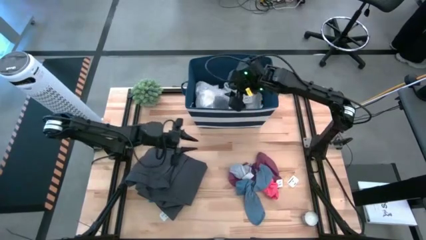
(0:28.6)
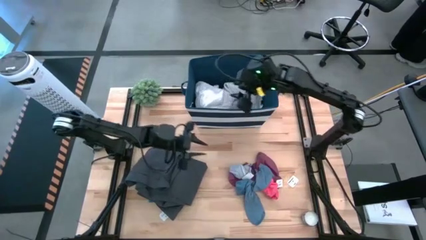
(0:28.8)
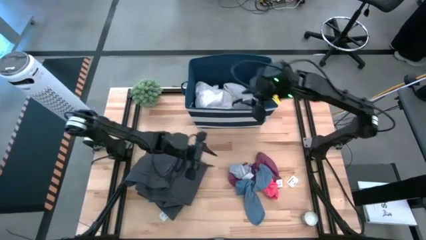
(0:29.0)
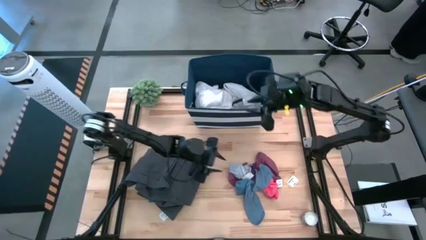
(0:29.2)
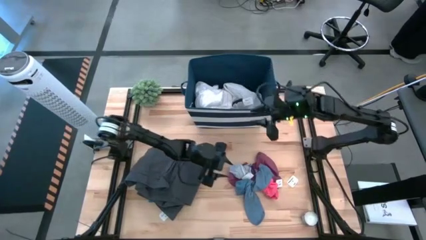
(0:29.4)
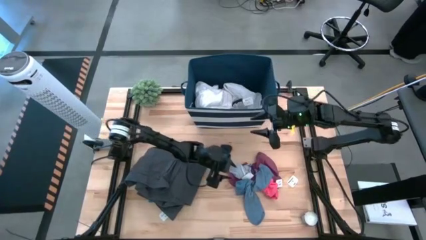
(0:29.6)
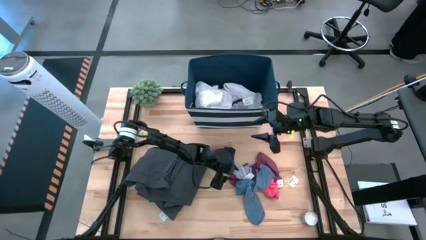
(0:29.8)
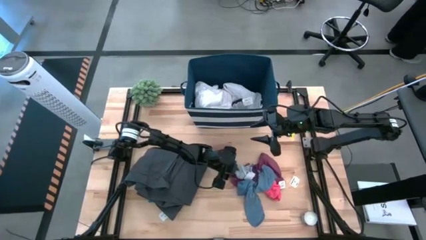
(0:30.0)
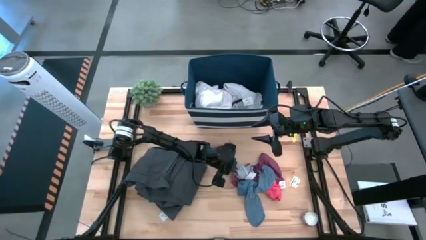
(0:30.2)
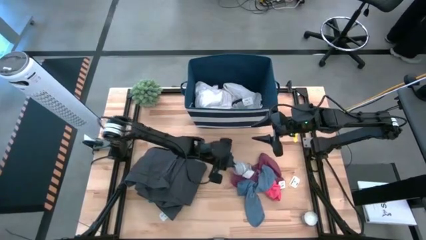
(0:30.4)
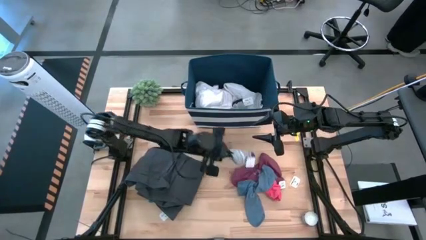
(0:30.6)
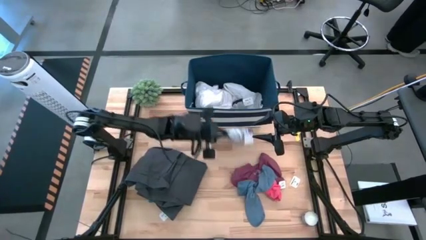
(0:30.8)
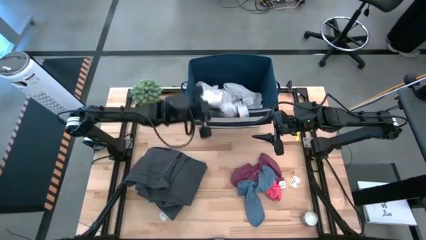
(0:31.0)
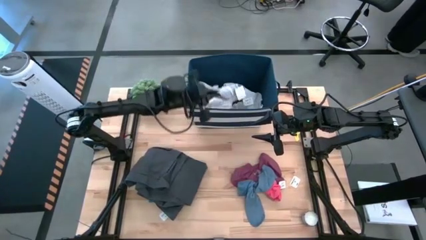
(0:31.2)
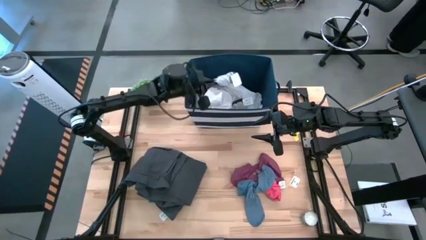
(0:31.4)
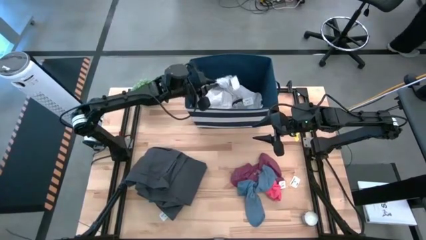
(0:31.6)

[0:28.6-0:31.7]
Task: Sort clothes
Put the light gray sock into the blue laundry organizer

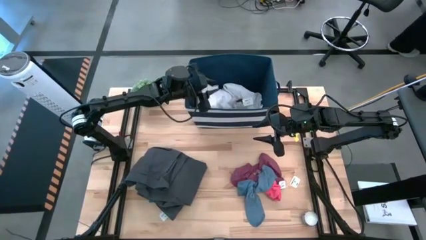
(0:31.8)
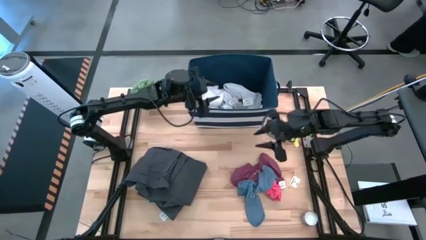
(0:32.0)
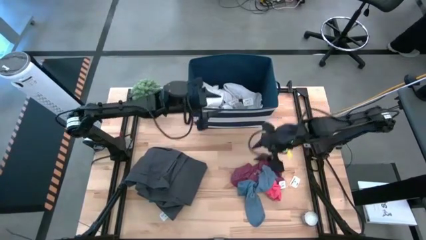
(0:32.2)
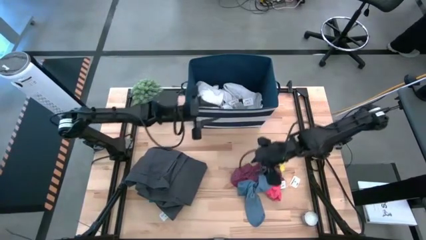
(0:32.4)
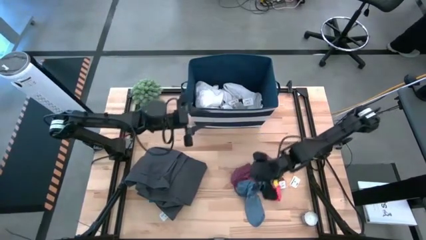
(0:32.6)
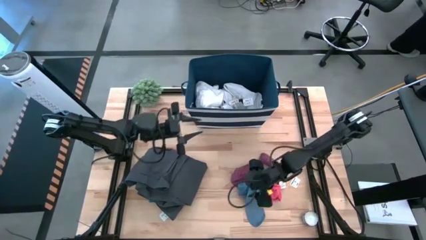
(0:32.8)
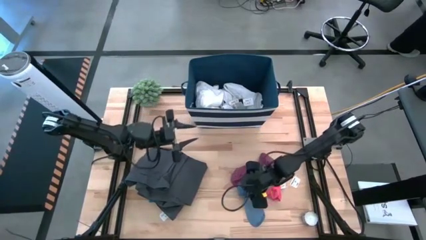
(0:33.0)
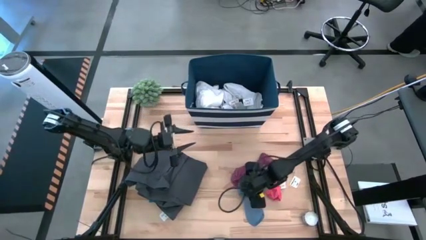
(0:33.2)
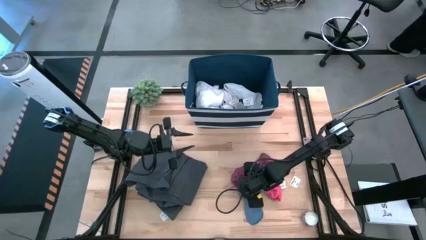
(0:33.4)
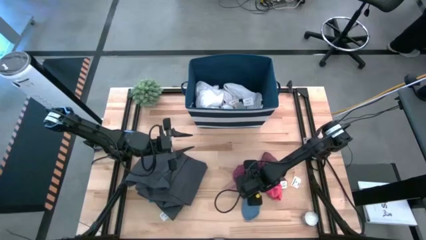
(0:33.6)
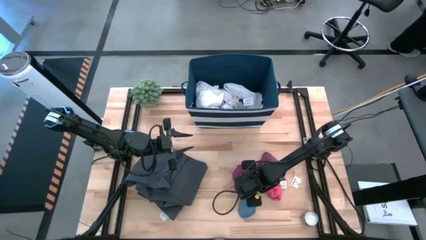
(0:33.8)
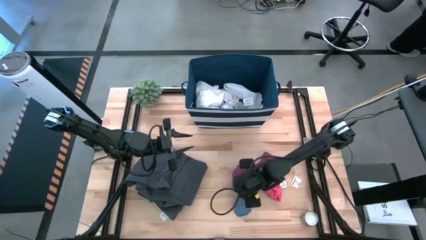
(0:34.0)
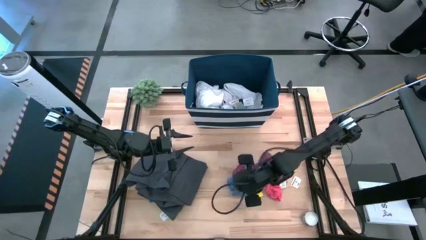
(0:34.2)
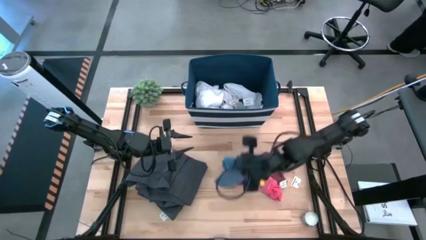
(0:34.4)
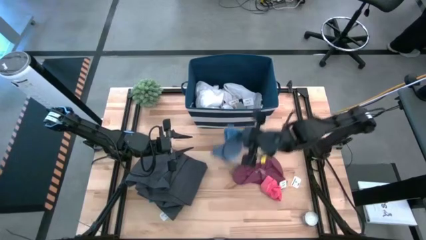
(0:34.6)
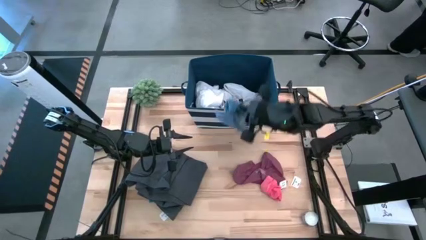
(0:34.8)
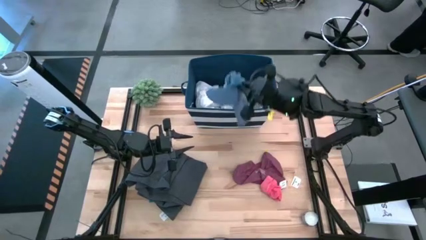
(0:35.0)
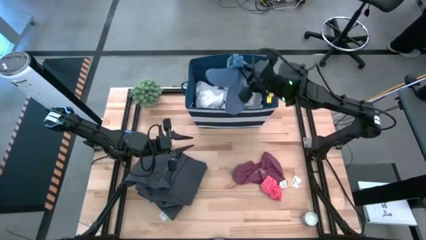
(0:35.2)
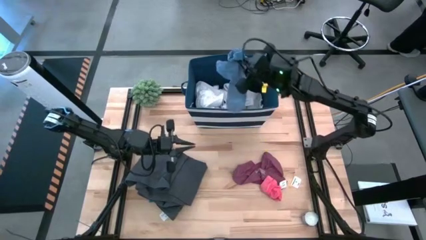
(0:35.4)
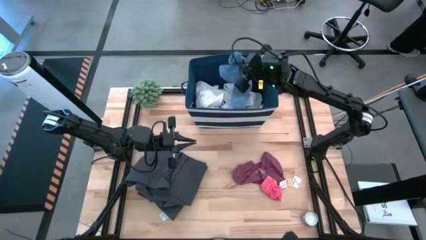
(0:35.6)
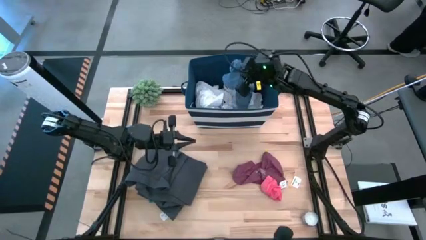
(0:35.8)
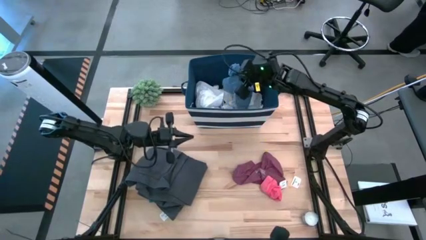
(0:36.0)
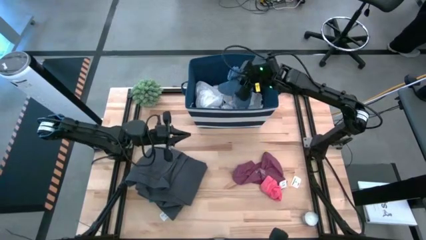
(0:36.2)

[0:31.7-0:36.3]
Put the blue sock into the blue laundry organizer

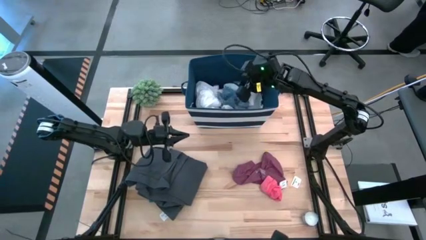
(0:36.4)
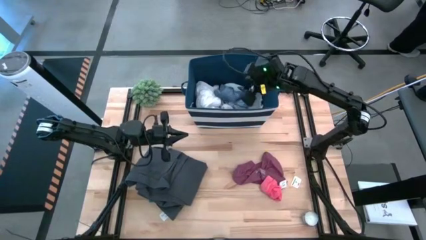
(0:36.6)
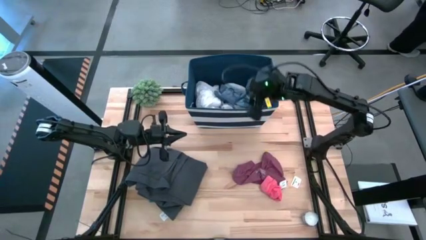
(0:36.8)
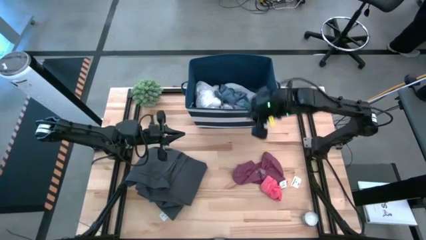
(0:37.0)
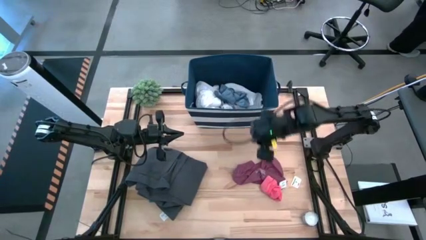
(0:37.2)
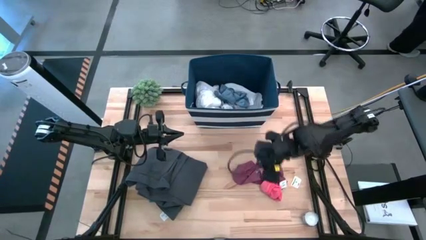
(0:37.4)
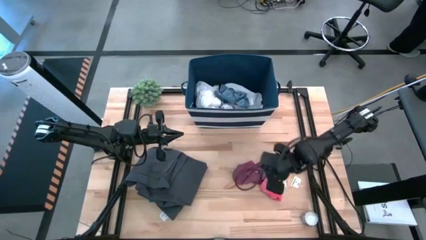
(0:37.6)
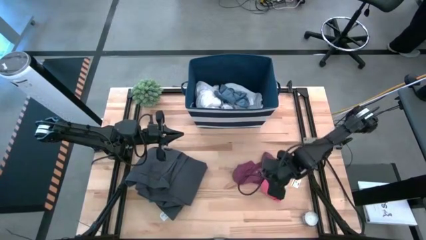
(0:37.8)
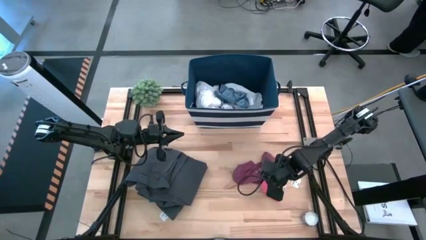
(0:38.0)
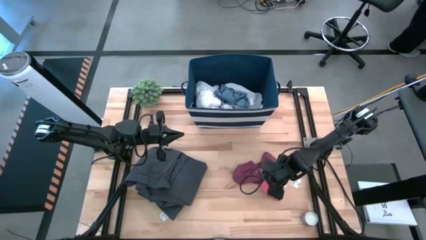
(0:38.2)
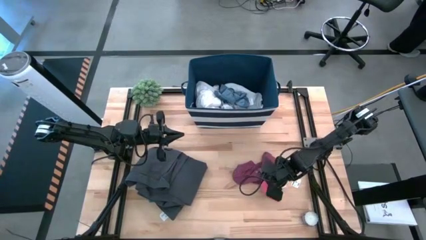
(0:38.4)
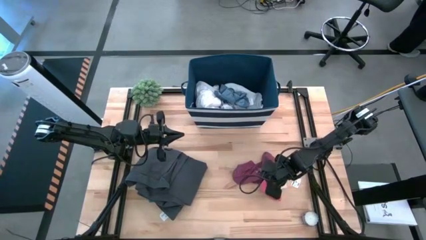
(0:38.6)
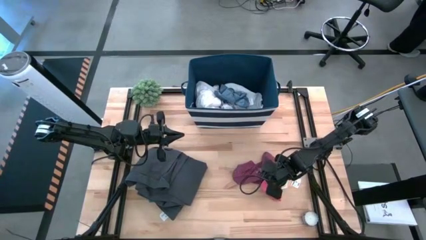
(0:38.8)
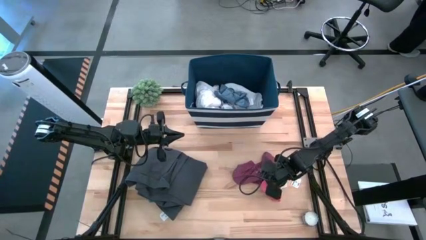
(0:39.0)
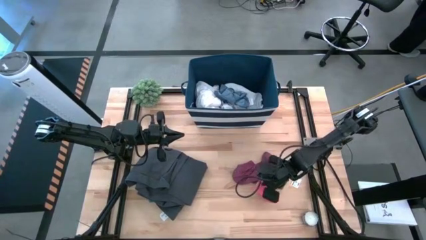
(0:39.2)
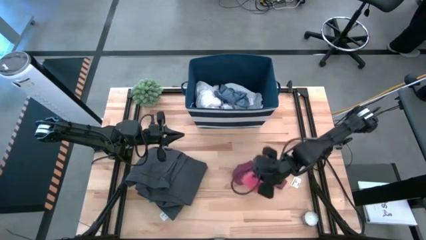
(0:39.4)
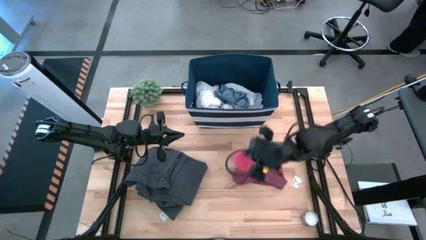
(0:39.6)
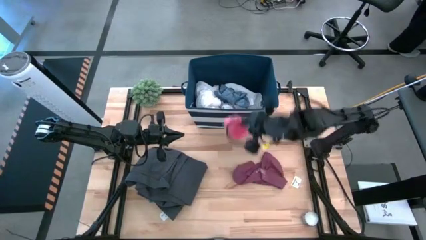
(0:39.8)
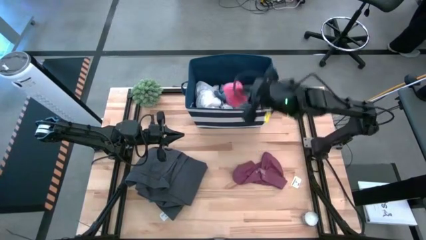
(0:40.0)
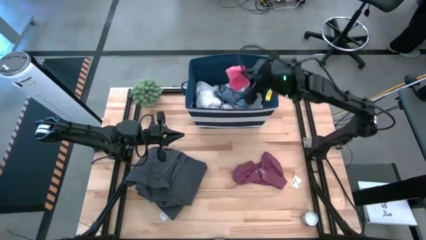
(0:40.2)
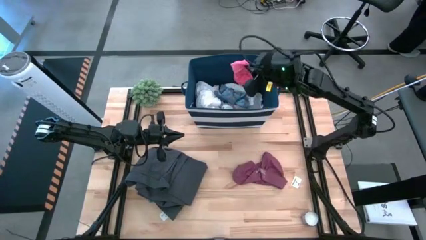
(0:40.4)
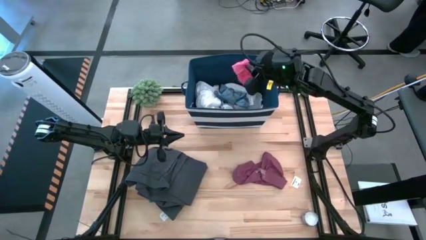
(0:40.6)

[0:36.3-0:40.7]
Put the pink sock into the blue laundry organizer
